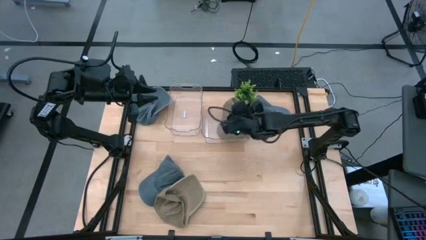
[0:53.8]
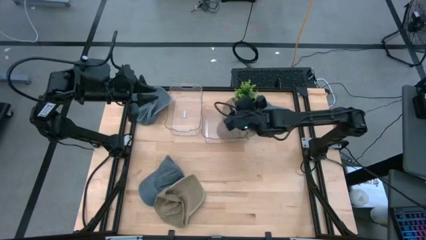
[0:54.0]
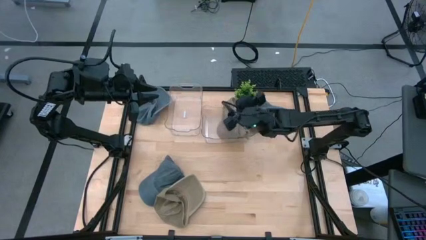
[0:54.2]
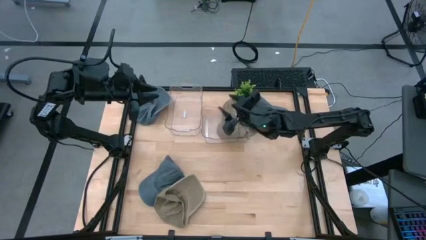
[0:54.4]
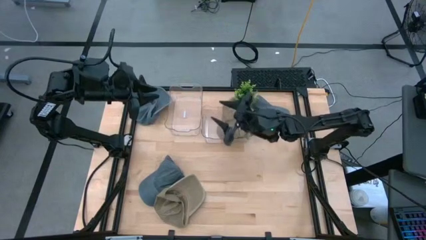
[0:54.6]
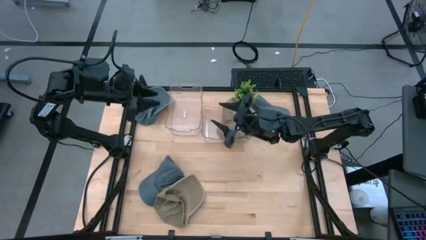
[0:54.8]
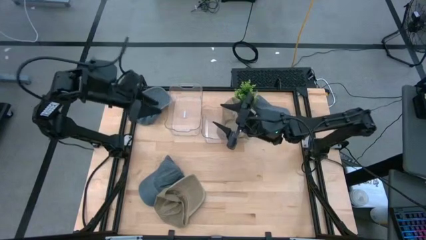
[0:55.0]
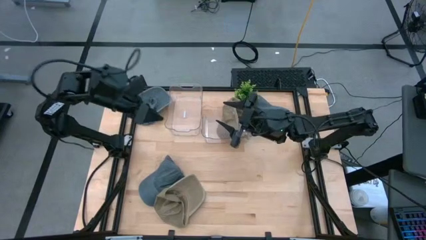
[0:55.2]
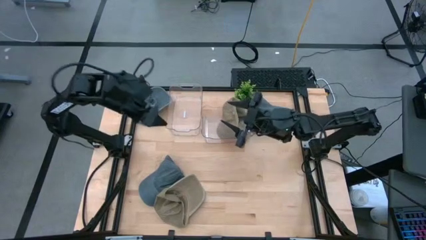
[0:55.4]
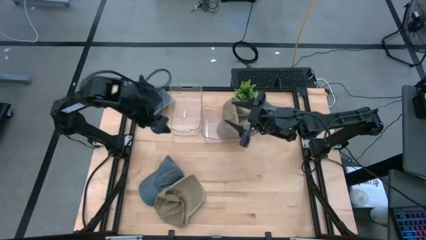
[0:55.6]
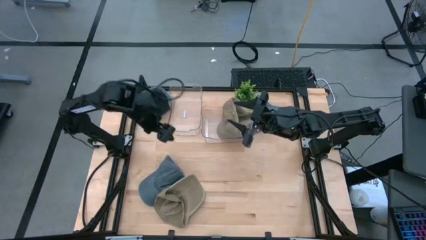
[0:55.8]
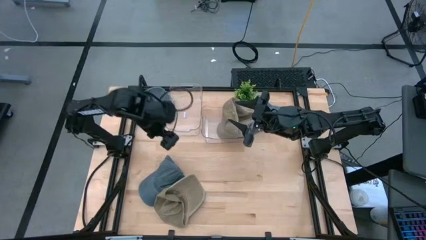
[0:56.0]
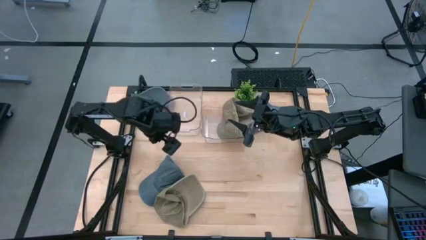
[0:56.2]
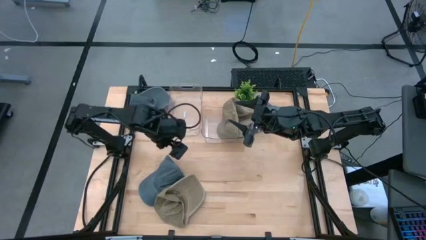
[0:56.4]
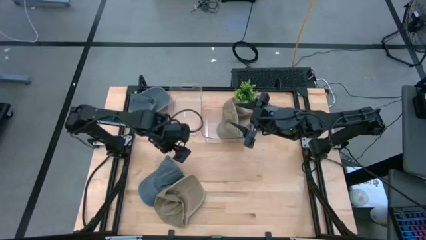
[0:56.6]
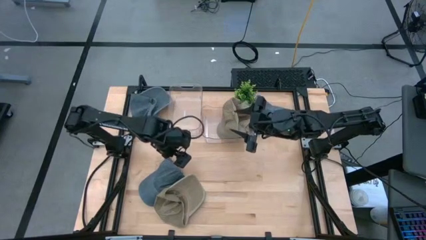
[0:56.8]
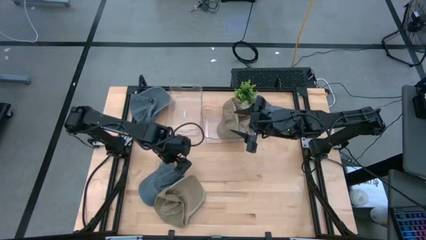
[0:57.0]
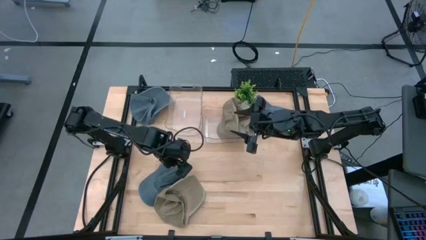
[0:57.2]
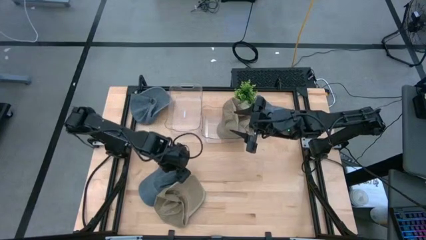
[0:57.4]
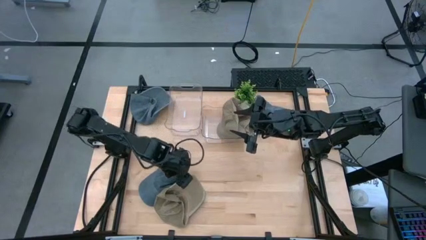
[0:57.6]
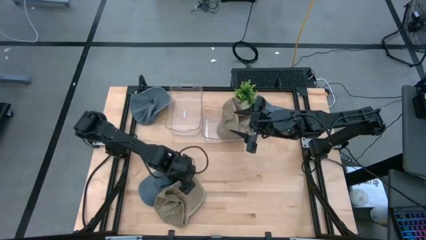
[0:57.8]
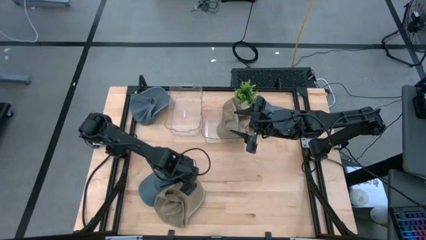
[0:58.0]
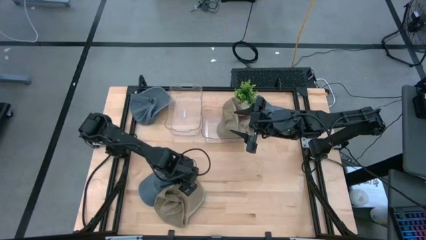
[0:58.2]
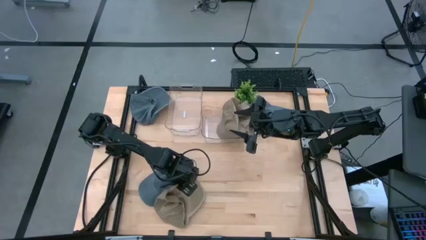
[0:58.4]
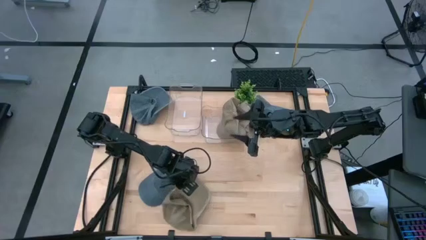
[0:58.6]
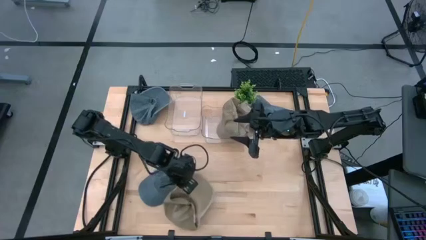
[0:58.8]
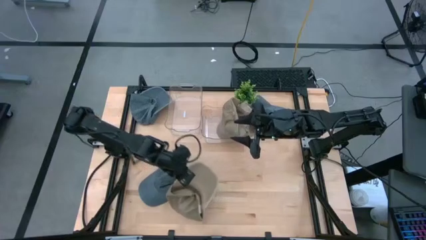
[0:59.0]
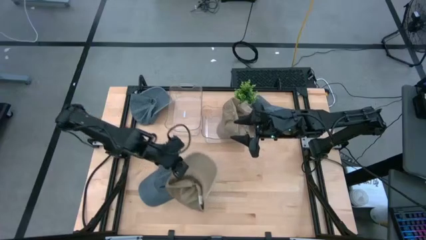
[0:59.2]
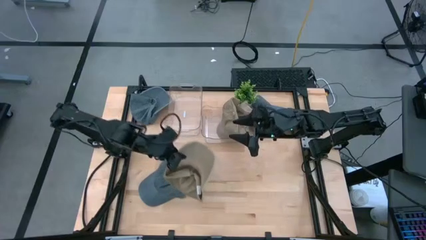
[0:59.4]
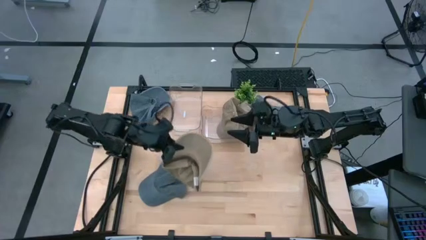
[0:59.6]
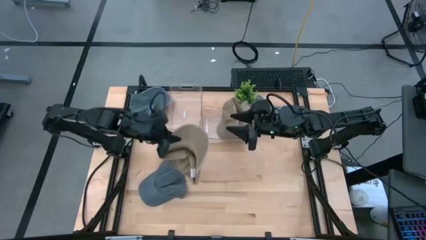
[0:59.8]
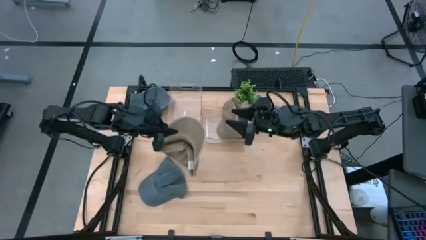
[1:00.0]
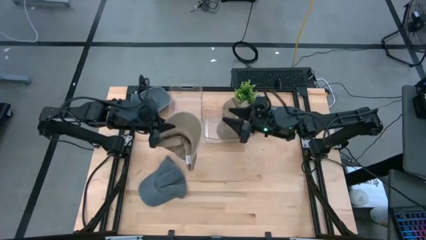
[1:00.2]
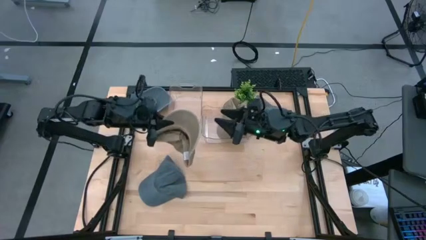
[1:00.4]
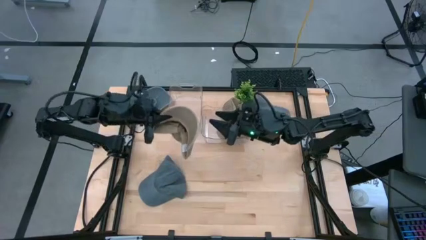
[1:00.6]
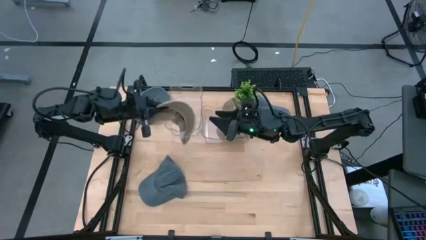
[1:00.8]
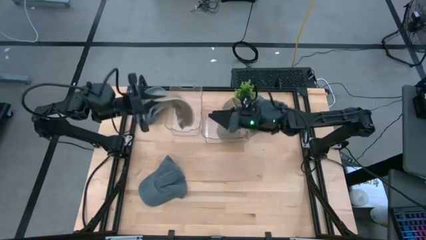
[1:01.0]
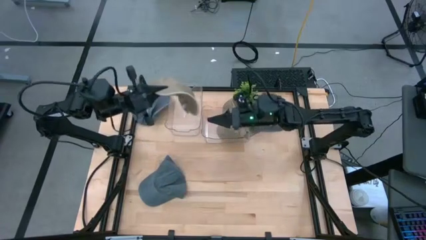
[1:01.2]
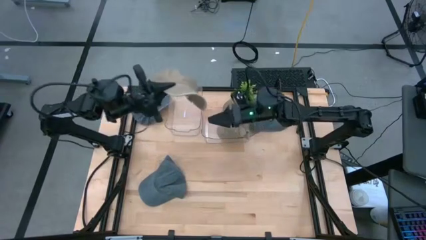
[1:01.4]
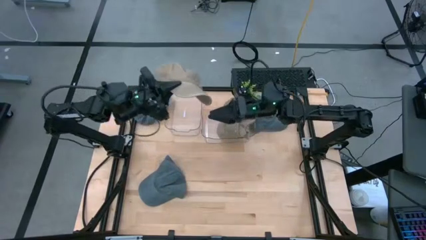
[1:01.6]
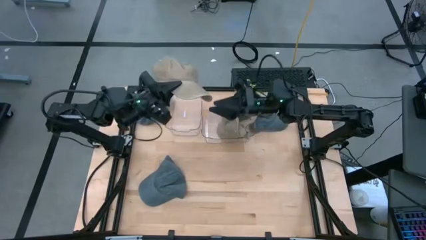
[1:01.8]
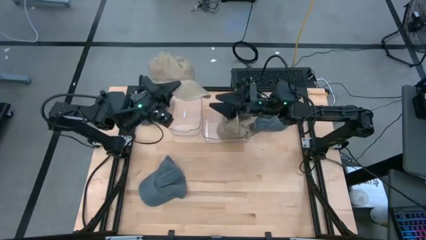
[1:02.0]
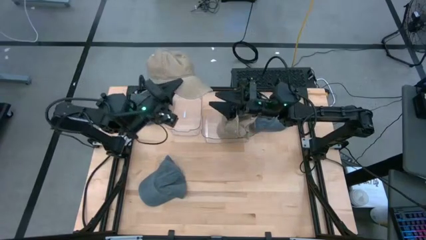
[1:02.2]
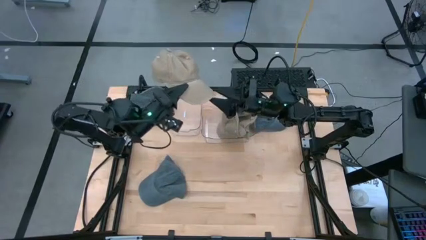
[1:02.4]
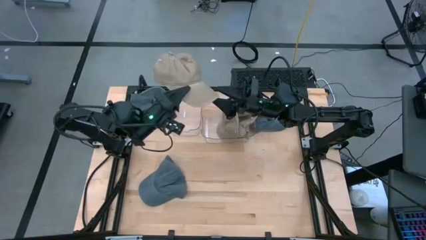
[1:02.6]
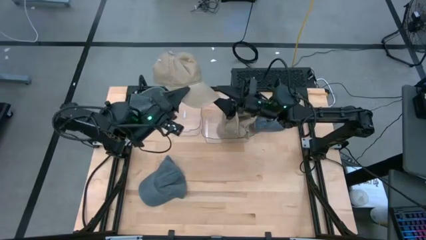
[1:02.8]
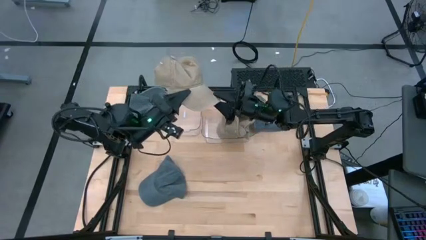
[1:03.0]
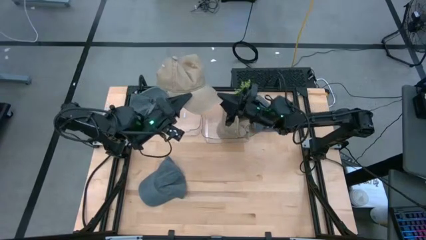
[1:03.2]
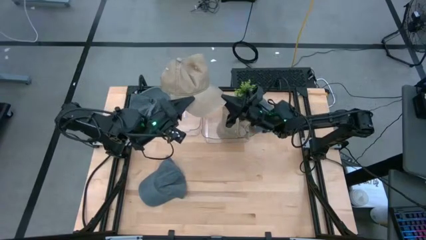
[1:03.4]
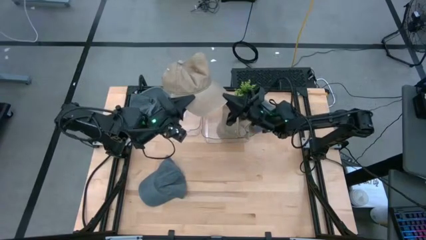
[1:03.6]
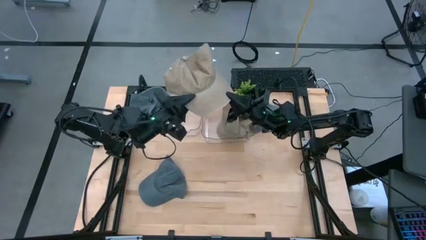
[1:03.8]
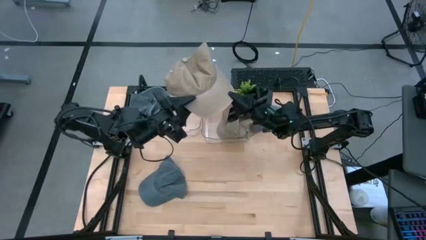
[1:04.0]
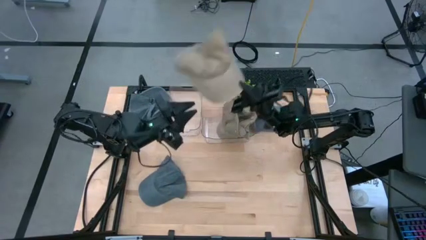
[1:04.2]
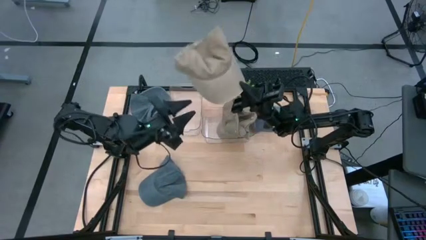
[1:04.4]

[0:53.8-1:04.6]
Task: Pick & Place hat
Put the brown cap into the right transparent bin
